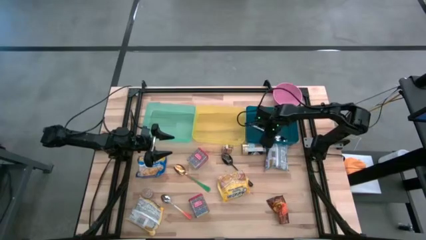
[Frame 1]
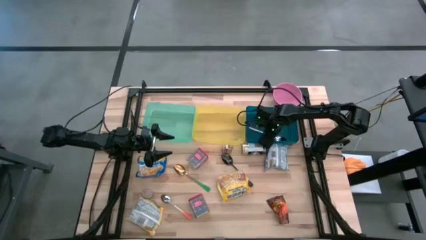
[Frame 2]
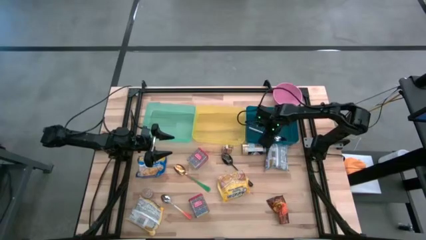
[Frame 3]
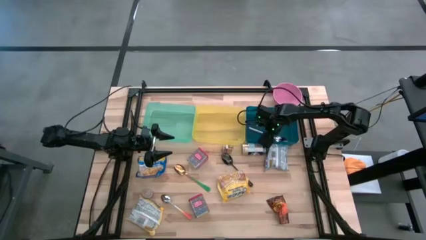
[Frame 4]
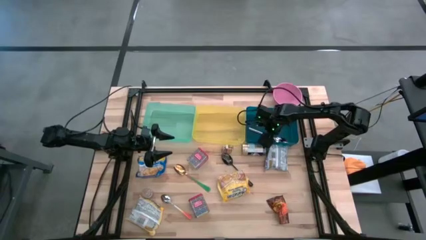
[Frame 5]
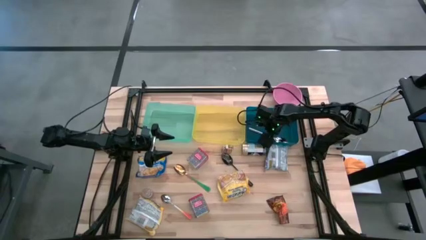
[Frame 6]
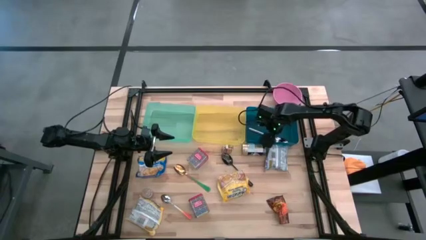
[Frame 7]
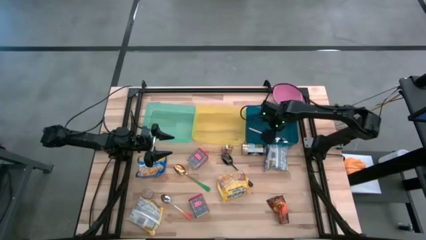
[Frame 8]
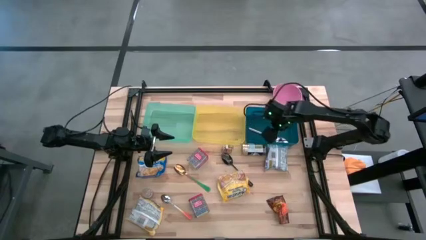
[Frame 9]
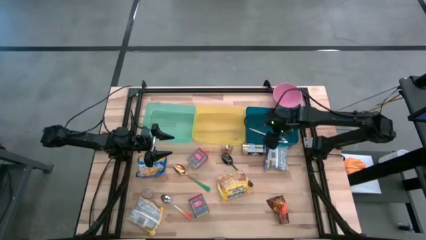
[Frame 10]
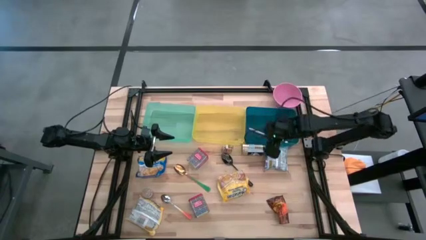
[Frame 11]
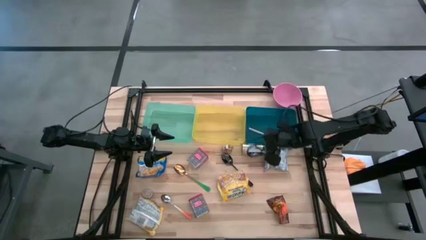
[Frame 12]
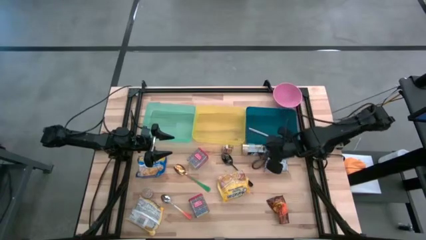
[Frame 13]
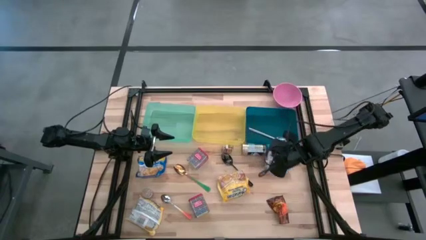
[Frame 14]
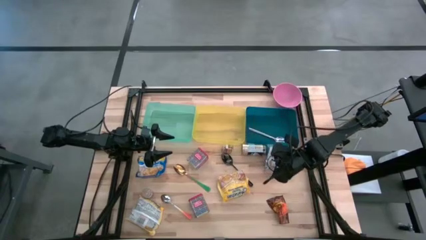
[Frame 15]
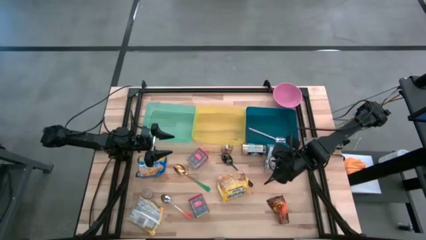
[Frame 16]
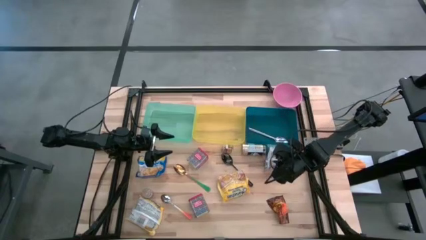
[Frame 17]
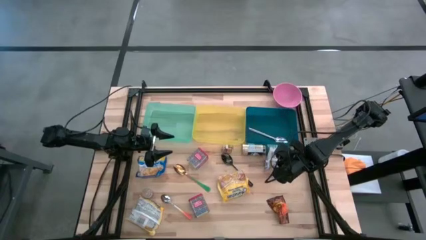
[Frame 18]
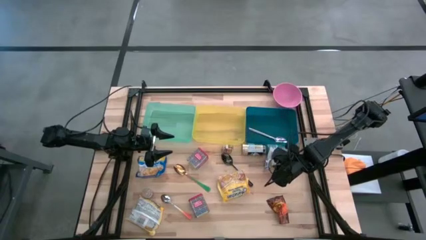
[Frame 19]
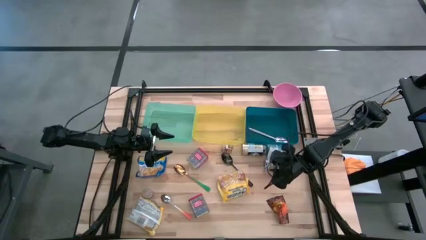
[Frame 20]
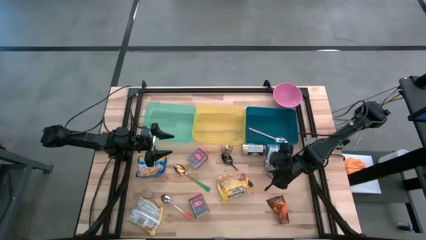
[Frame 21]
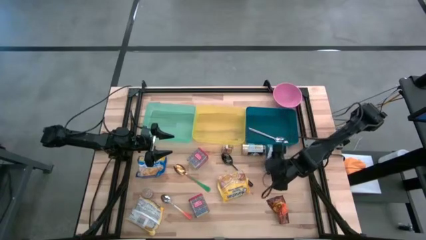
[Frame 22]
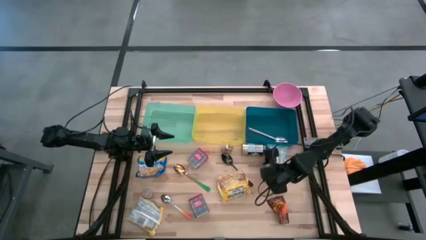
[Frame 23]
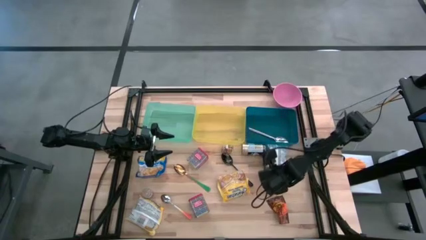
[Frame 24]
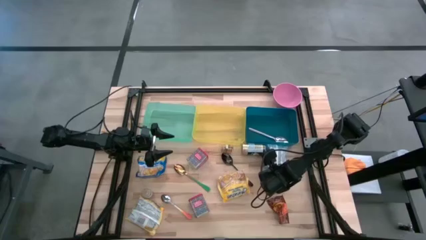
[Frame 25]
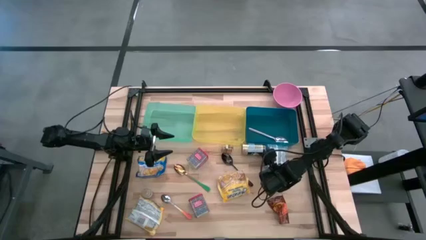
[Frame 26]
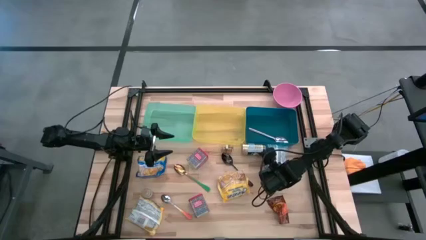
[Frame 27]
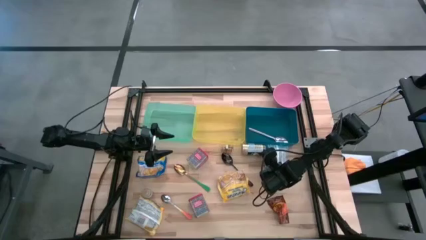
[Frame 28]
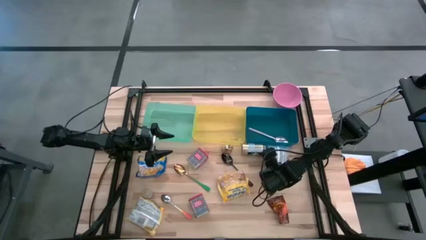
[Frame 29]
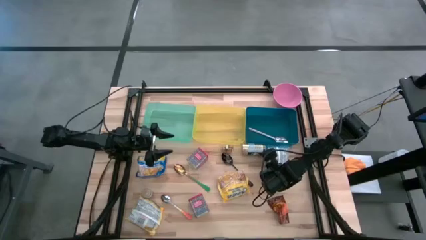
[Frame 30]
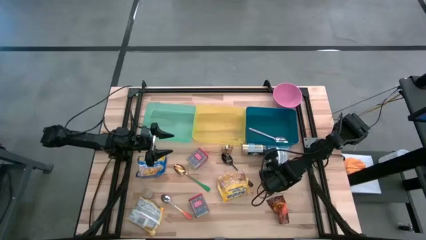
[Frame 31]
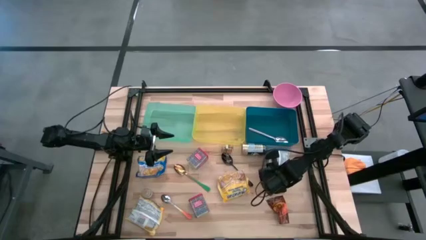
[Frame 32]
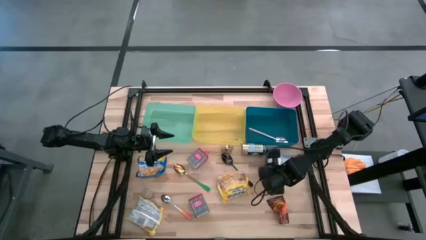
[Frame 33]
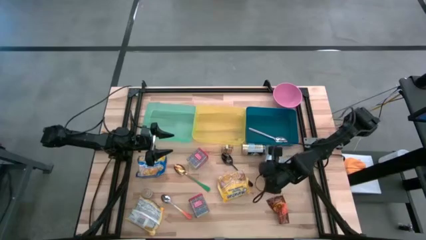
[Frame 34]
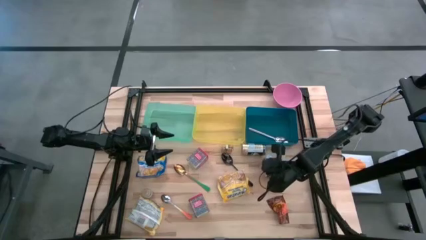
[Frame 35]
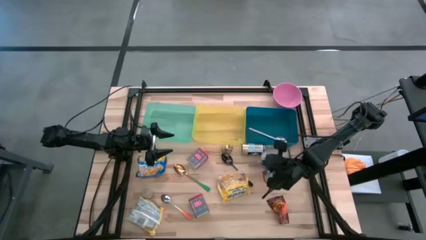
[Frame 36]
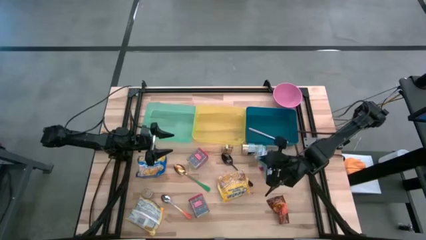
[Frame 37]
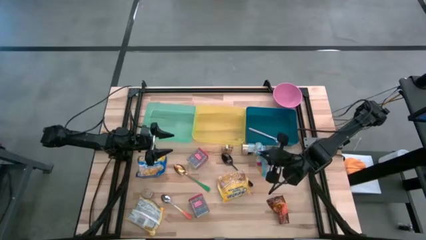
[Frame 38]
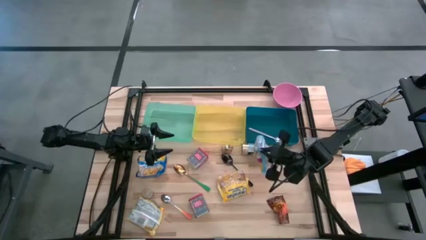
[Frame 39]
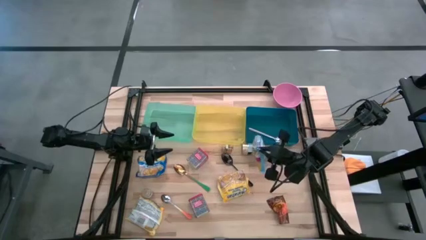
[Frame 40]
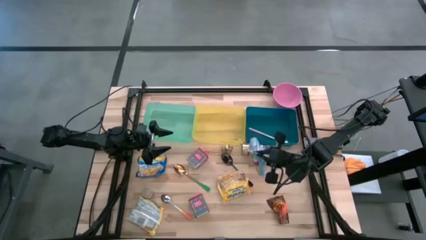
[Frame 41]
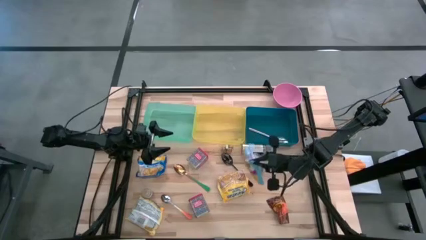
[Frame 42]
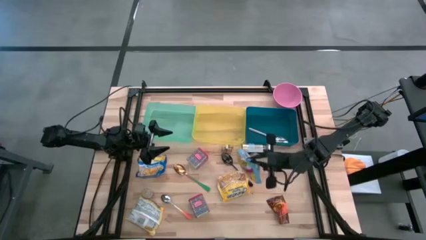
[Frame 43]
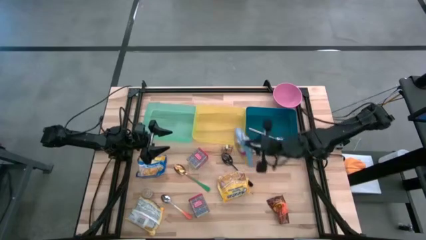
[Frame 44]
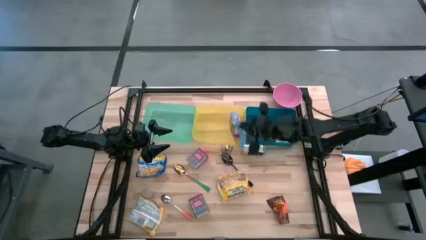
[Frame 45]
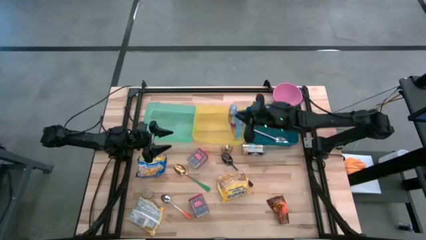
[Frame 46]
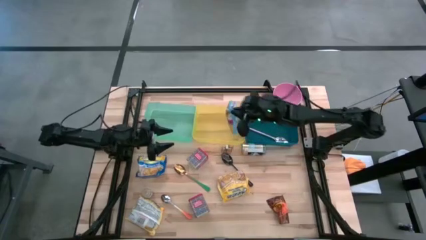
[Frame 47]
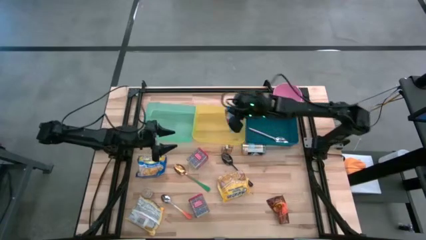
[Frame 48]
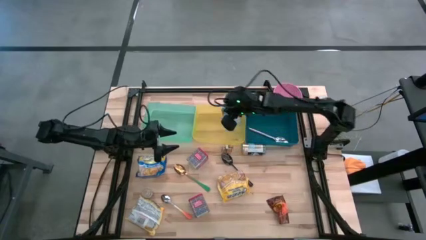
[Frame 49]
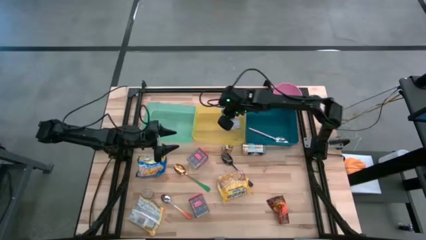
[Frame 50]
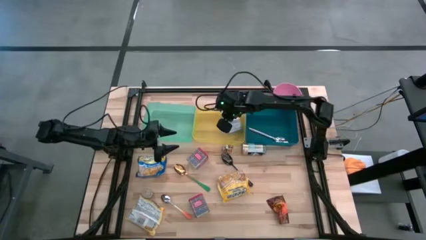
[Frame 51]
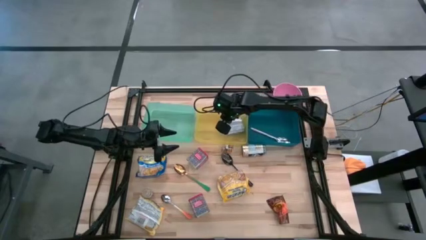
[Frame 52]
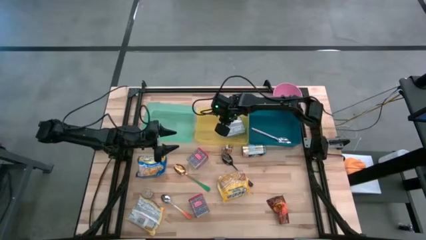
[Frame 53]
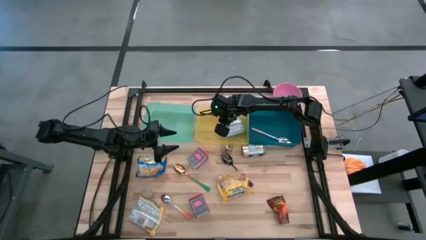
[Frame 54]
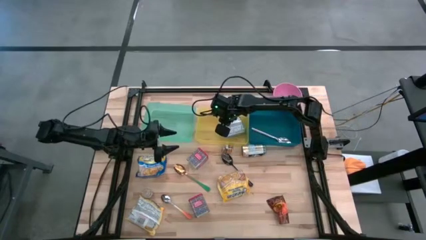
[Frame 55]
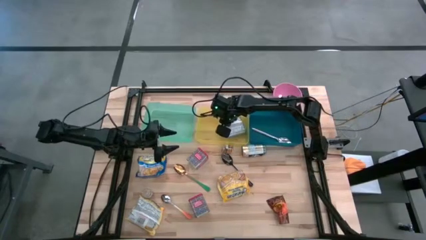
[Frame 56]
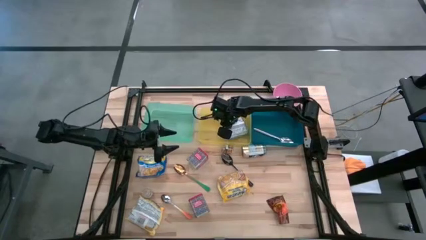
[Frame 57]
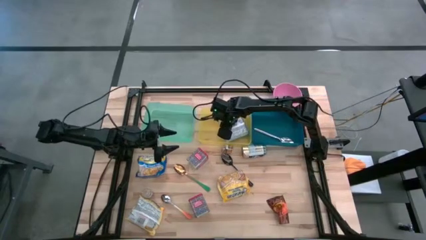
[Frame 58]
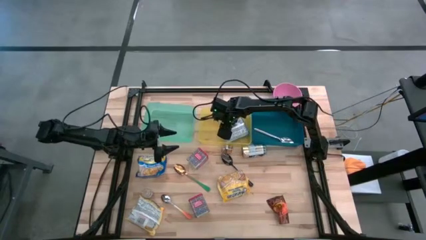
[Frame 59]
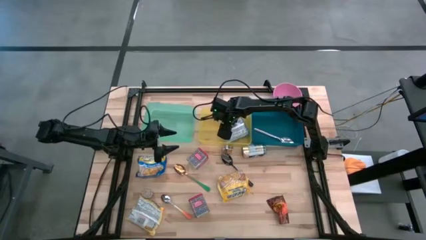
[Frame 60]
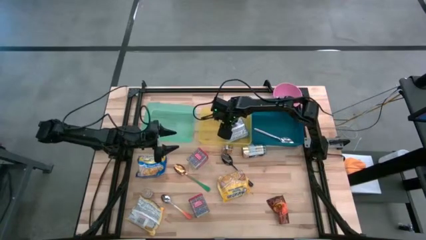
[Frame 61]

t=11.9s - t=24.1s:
Put the blue noodle pack into the yellow bin
